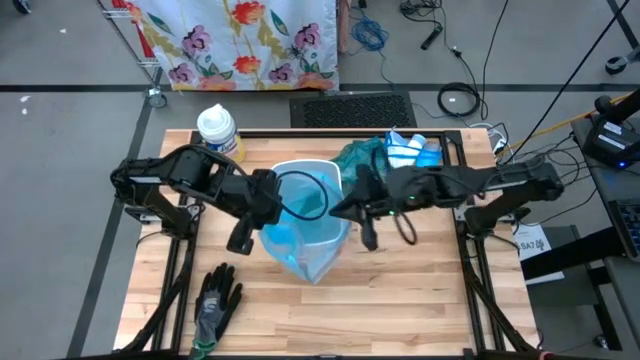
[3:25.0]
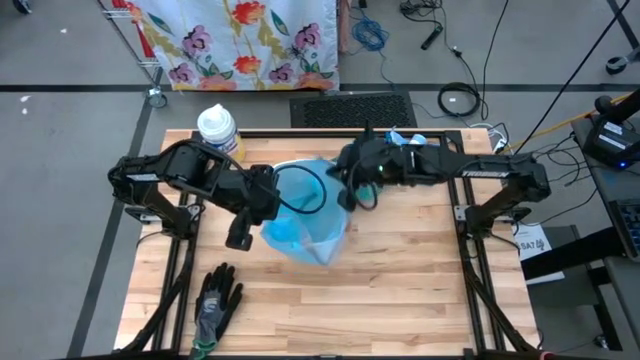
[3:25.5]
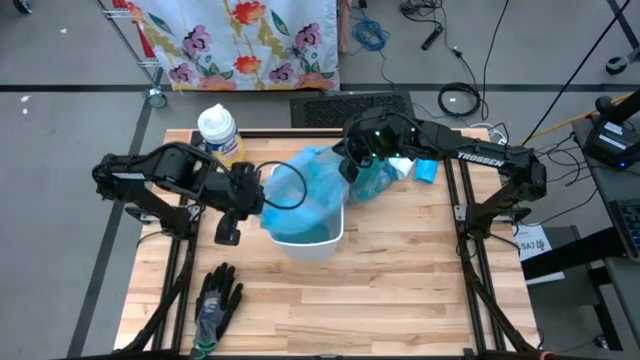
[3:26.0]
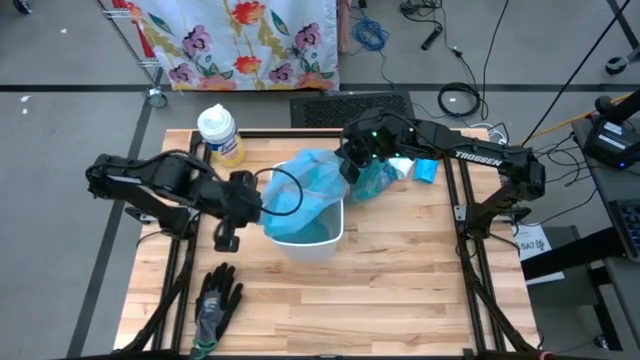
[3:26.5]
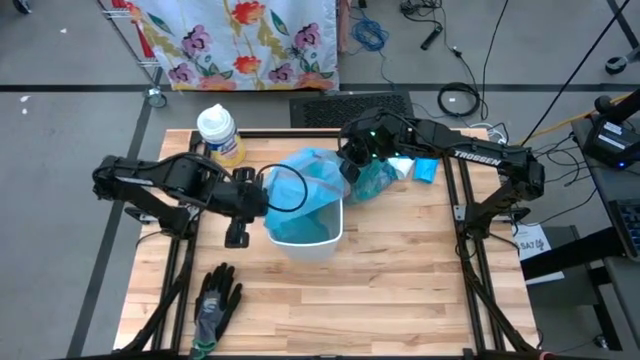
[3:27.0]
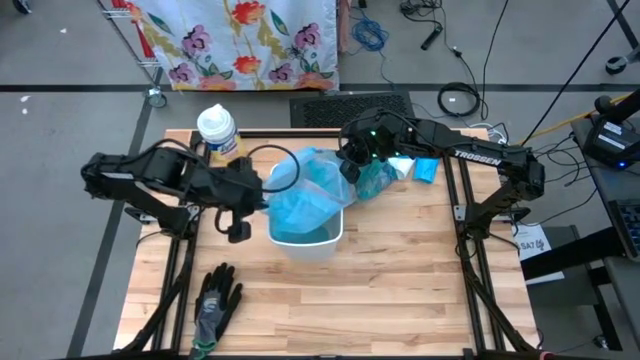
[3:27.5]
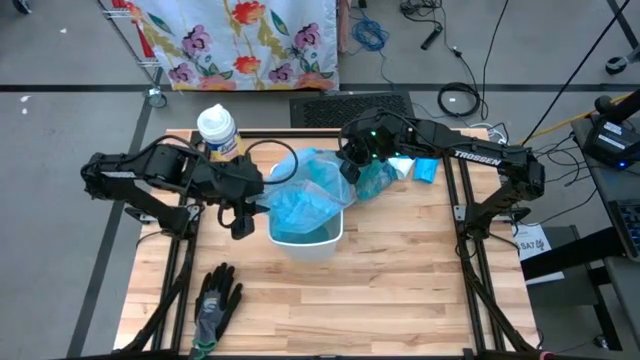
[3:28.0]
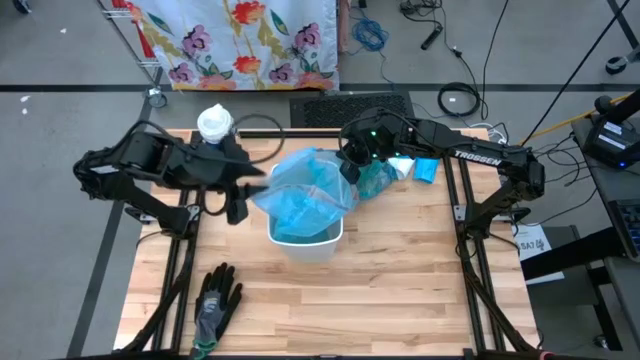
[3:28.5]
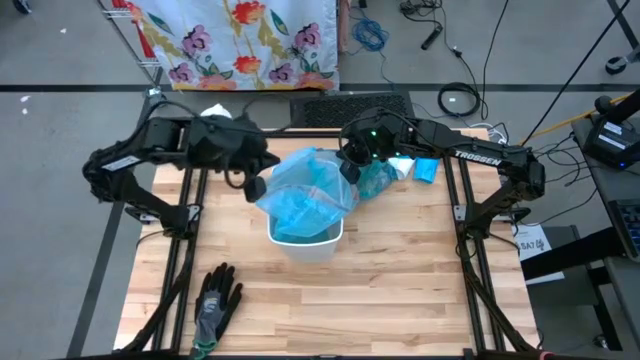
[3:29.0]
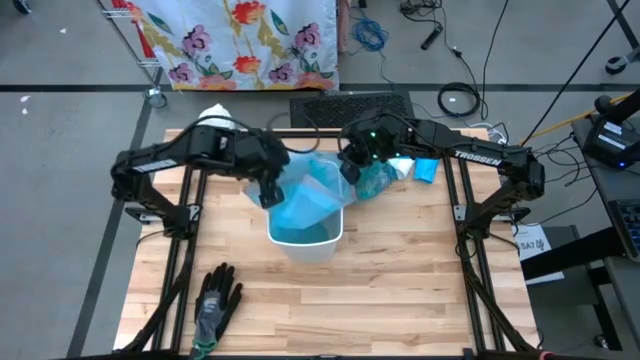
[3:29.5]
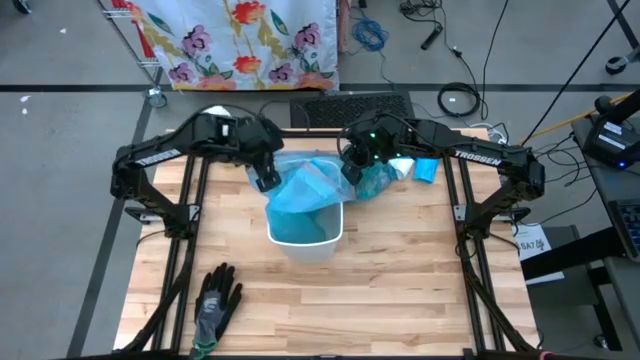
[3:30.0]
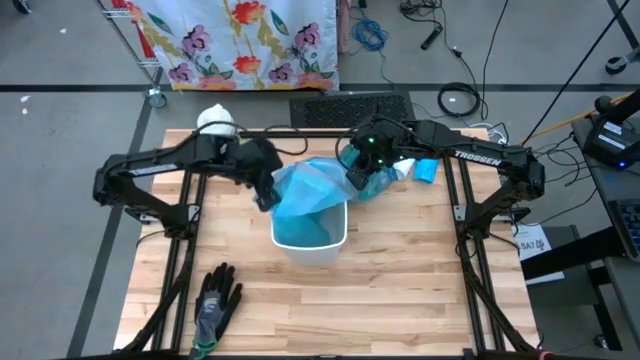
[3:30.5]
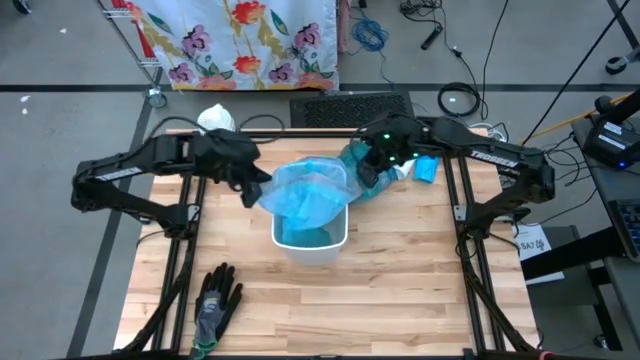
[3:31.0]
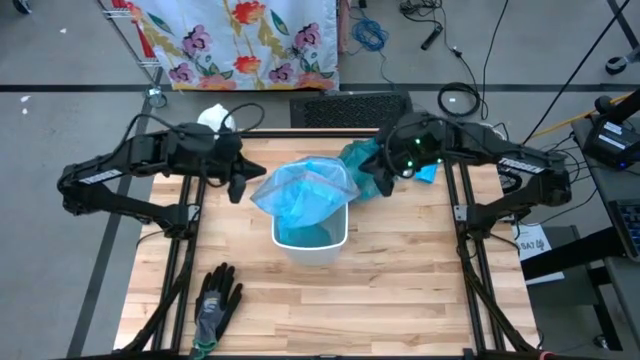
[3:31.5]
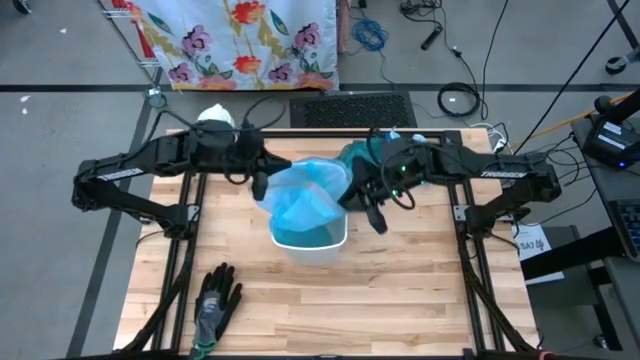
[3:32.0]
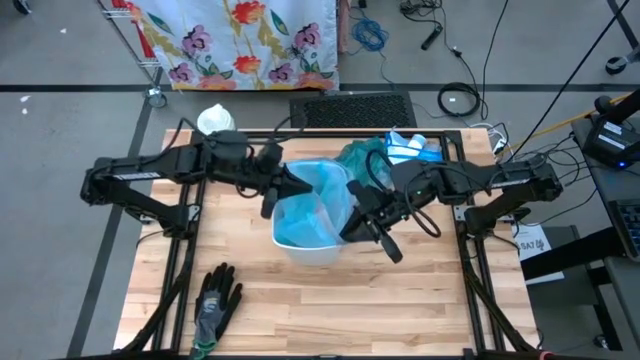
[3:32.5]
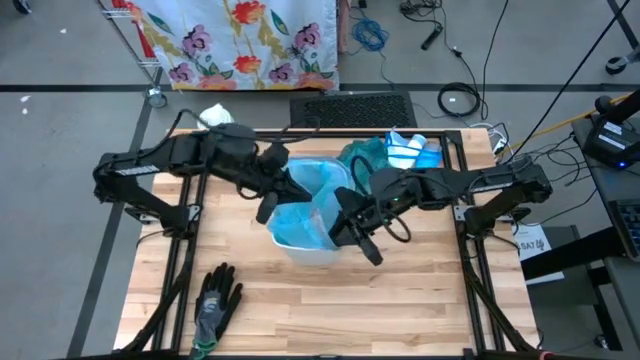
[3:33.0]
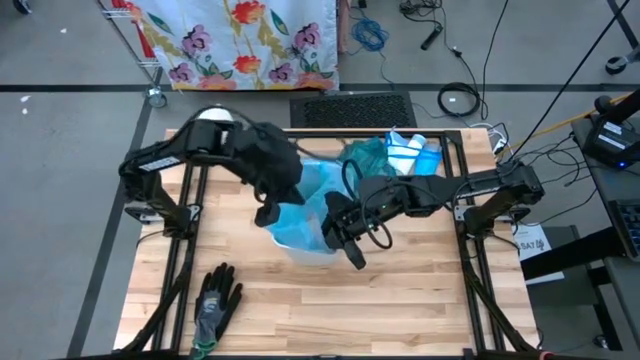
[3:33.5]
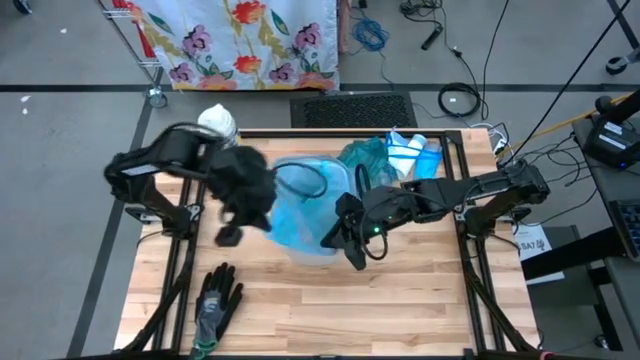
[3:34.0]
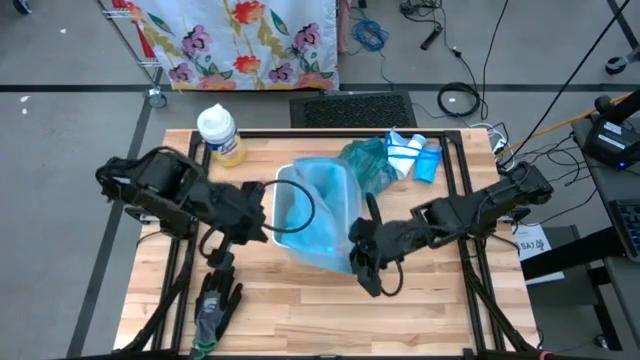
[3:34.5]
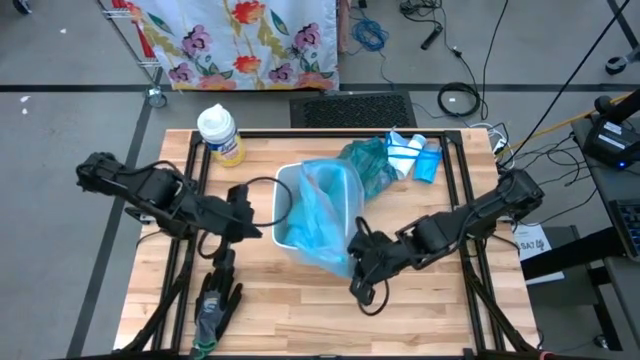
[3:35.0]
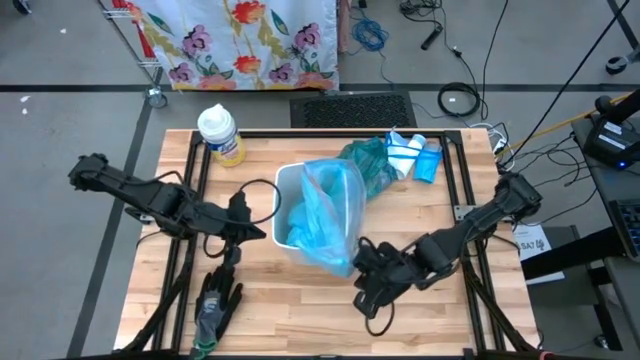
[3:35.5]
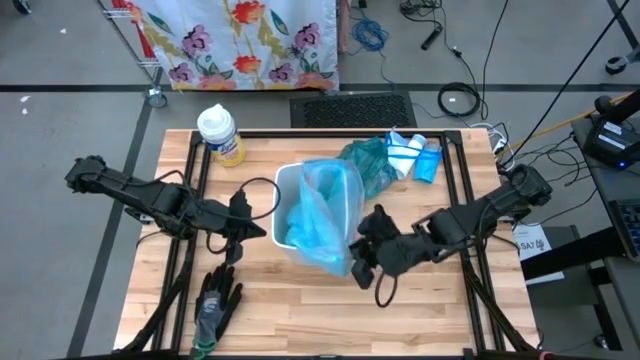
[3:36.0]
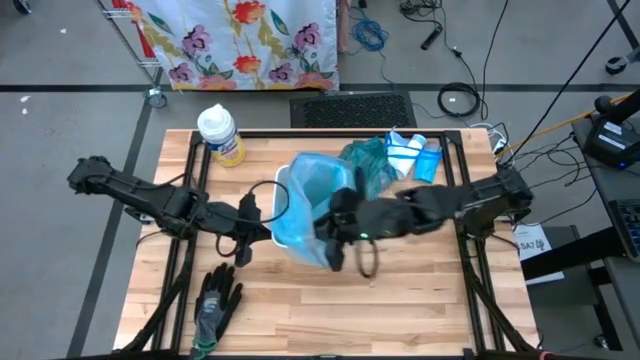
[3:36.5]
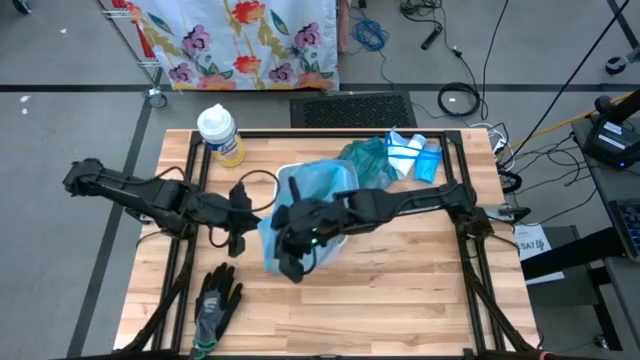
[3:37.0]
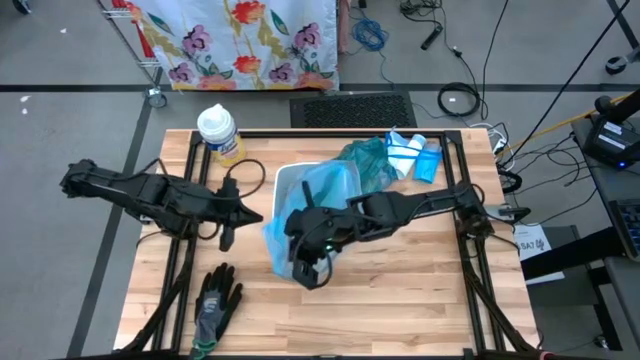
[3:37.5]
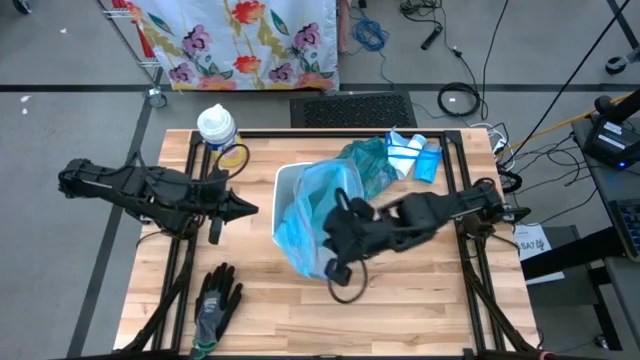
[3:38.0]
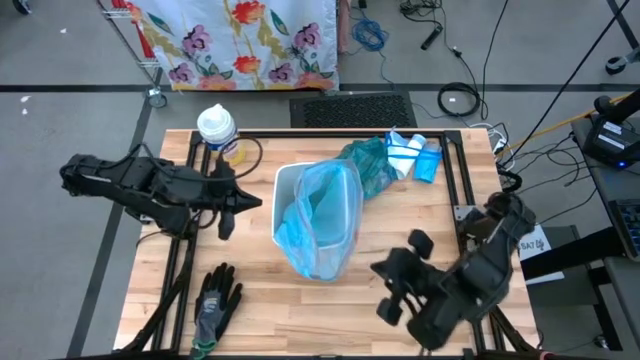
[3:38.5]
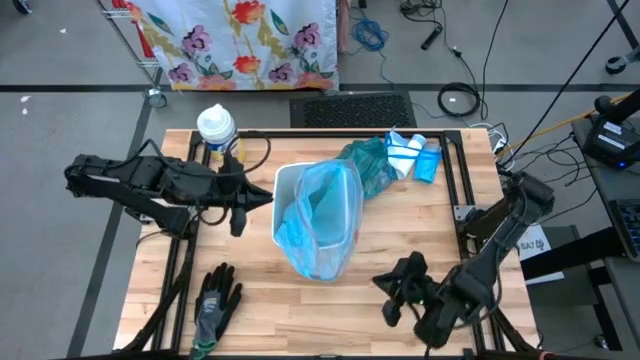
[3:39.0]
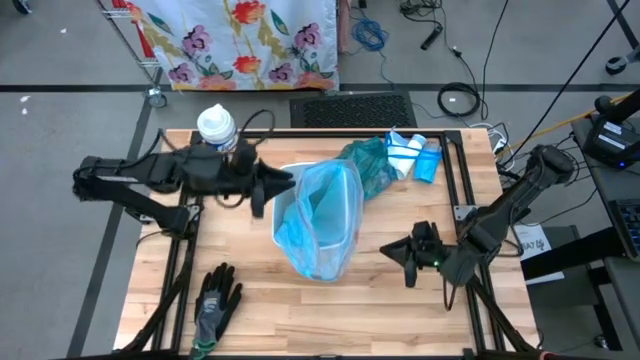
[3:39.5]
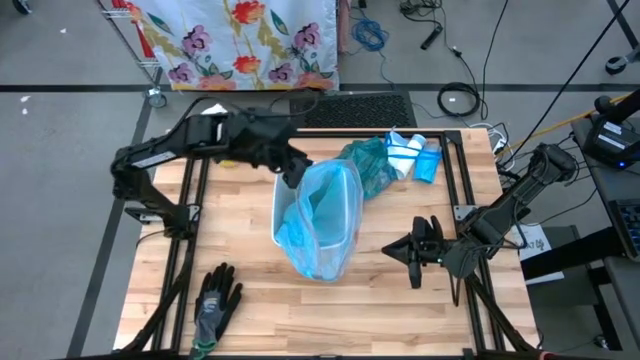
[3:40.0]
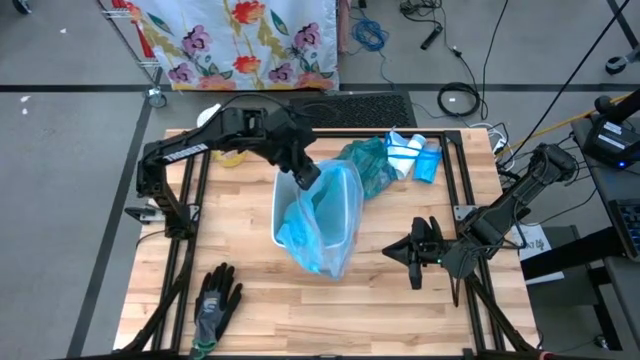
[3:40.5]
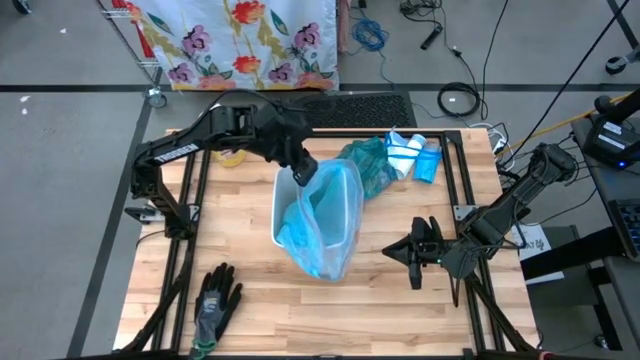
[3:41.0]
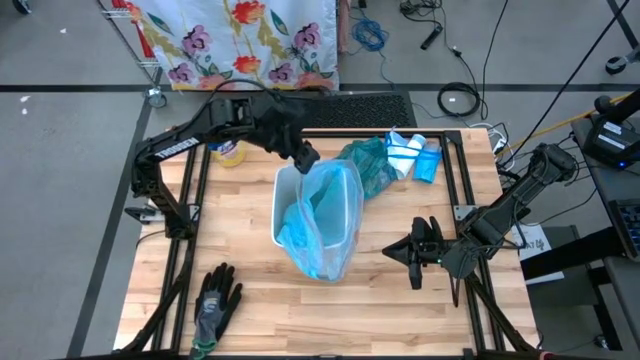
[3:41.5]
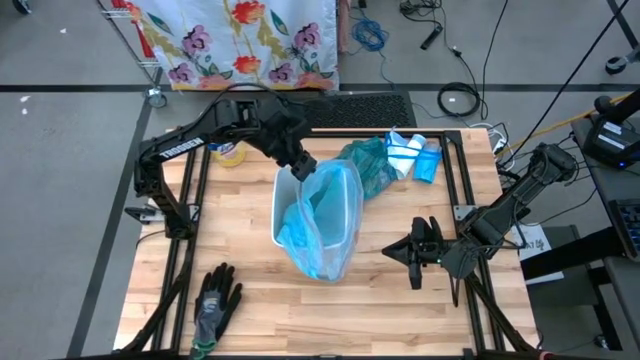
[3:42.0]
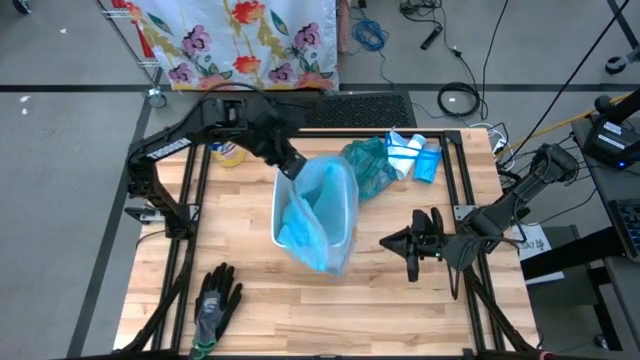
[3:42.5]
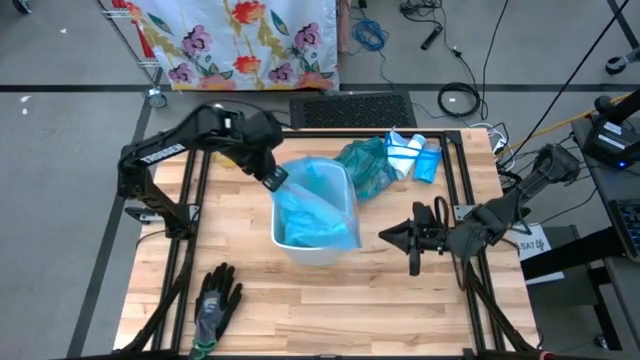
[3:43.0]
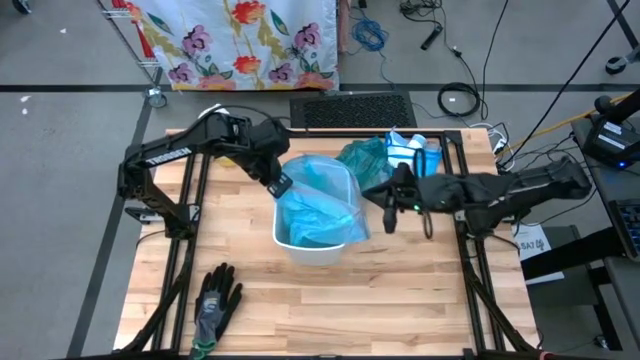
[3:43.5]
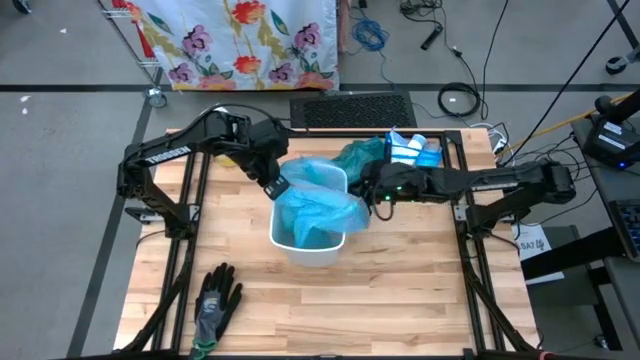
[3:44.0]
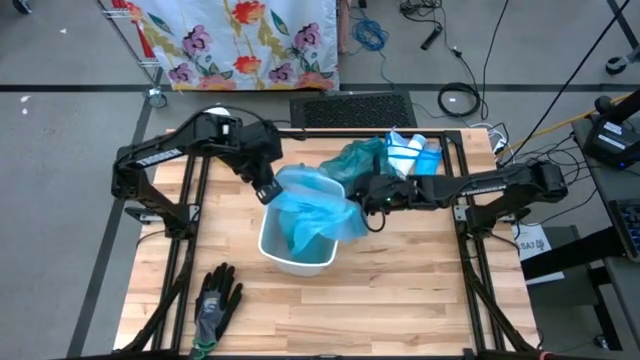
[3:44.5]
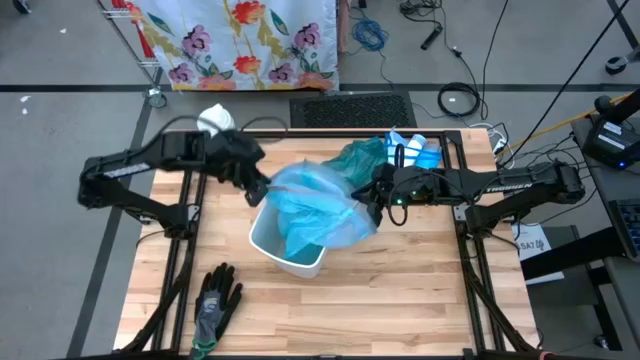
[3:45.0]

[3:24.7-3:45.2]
Task: place trash/remove bag and relplace
Insert the light blue trash bag into the white trash bin

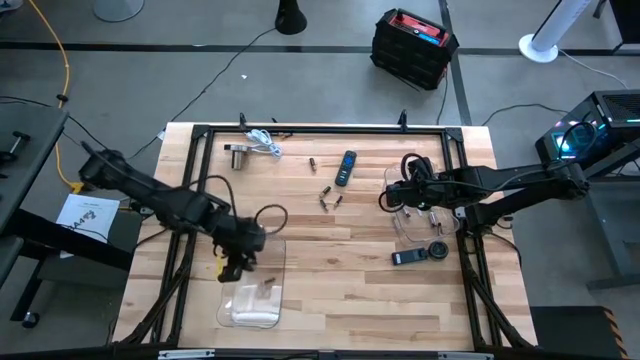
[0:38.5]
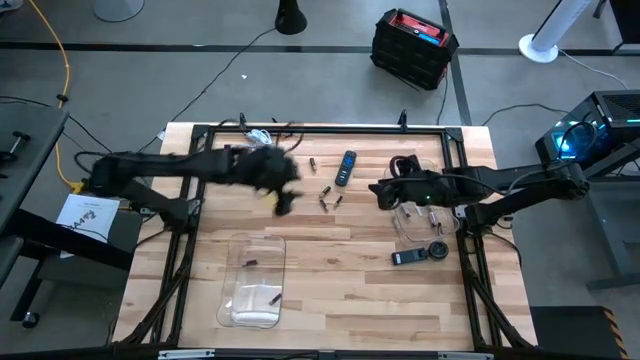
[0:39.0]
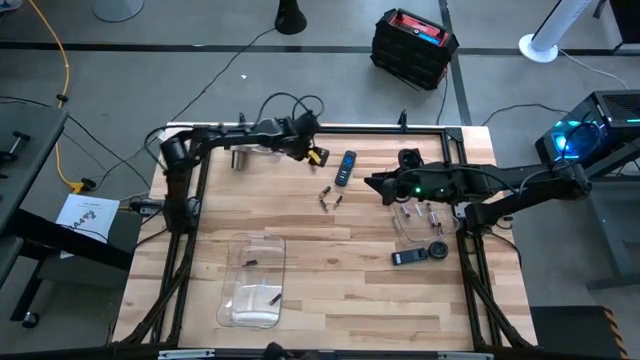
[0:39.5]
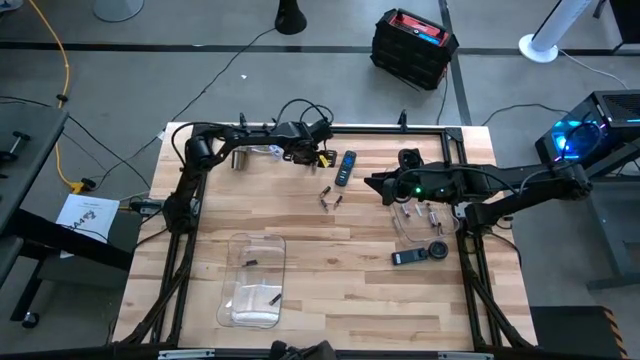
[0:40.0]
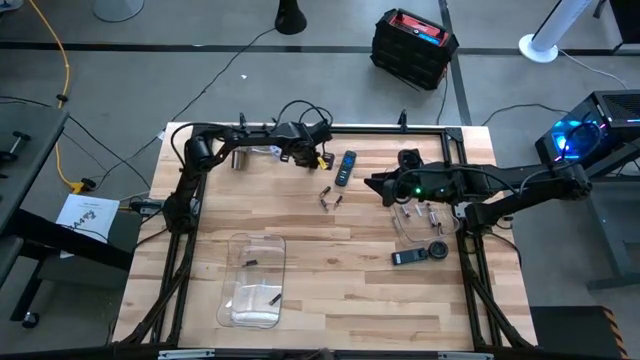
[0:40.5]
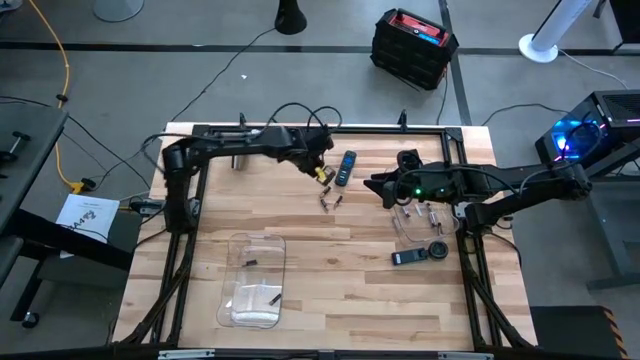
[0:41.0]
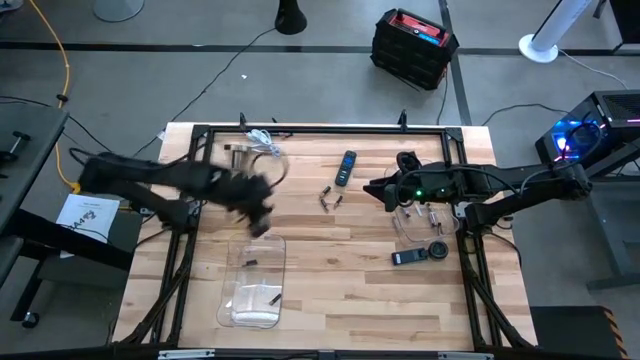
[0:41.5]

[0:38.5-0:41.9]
Task: Sort batteries
Put the black battery into the left transparent bin
